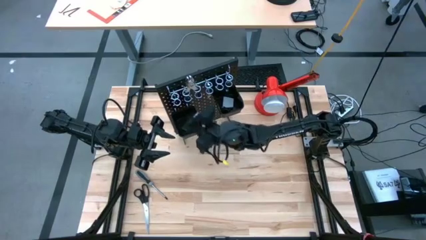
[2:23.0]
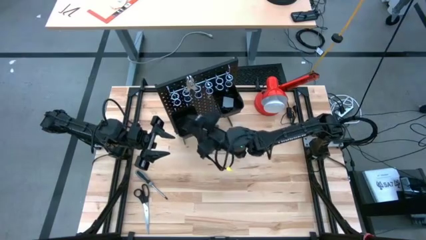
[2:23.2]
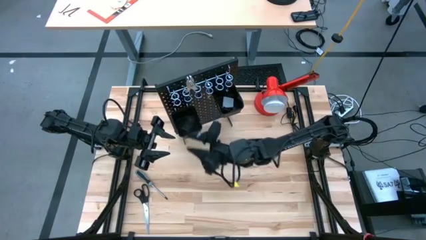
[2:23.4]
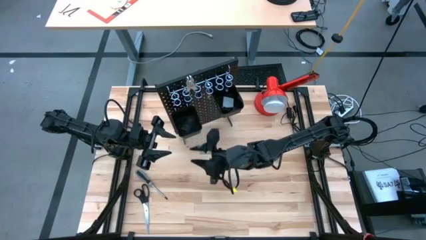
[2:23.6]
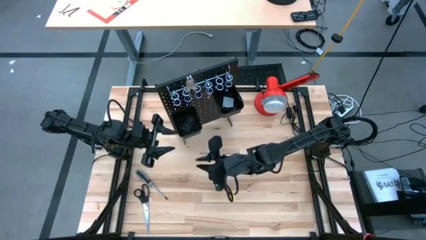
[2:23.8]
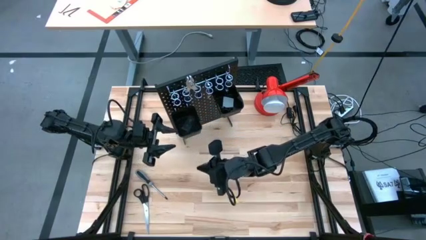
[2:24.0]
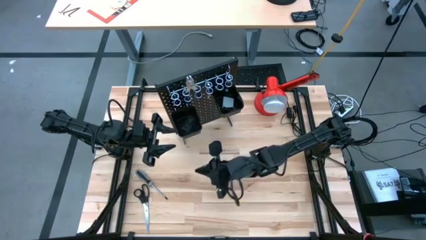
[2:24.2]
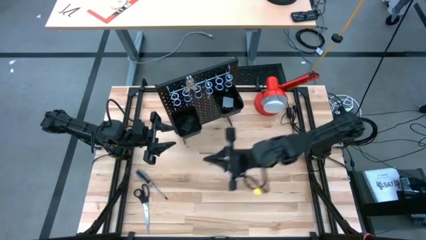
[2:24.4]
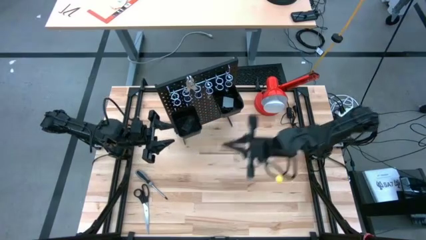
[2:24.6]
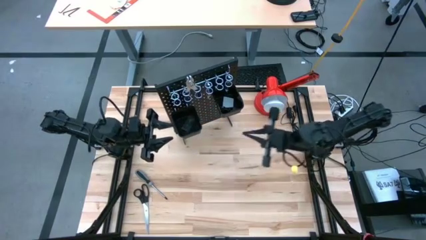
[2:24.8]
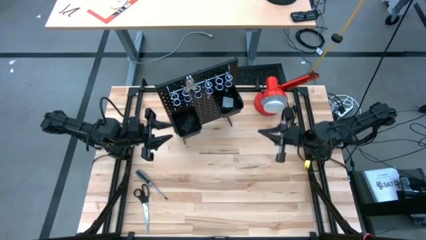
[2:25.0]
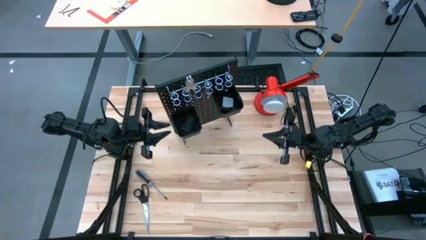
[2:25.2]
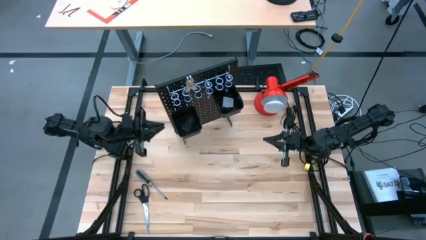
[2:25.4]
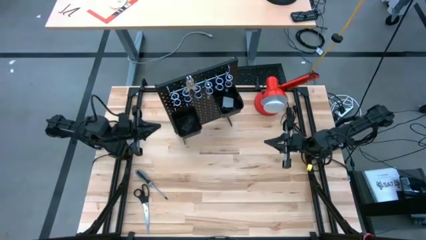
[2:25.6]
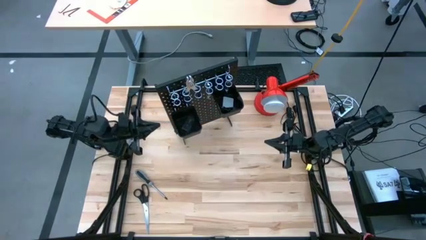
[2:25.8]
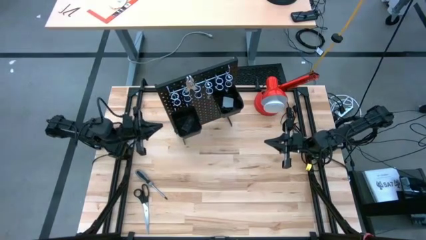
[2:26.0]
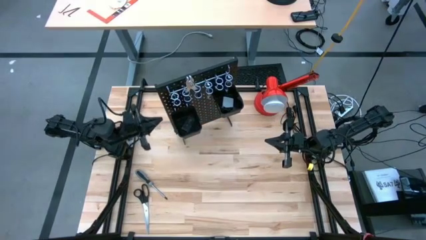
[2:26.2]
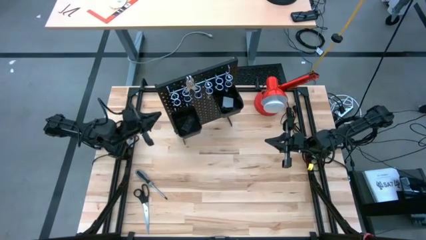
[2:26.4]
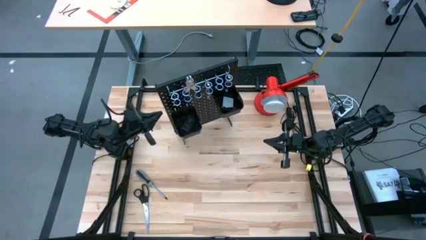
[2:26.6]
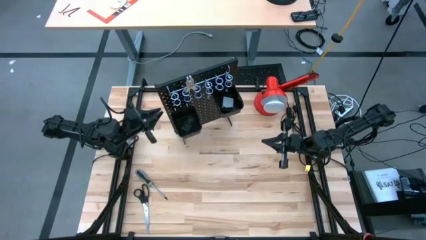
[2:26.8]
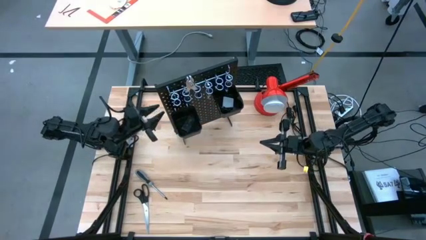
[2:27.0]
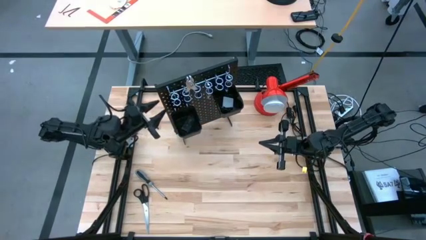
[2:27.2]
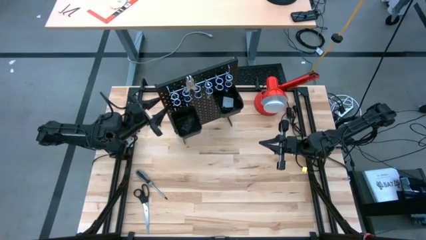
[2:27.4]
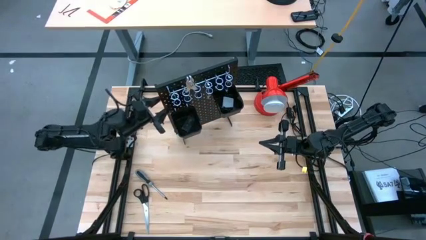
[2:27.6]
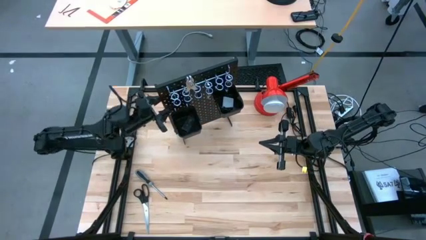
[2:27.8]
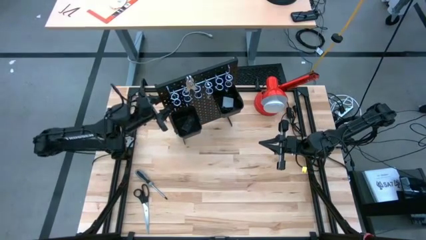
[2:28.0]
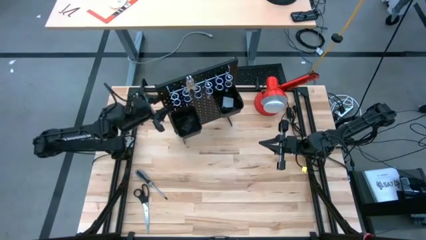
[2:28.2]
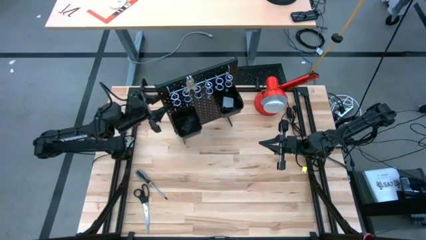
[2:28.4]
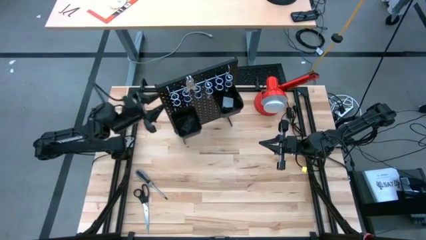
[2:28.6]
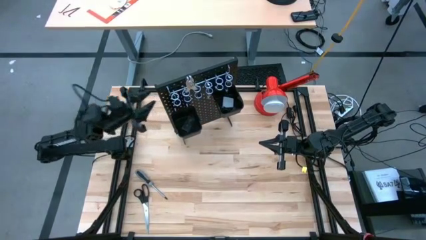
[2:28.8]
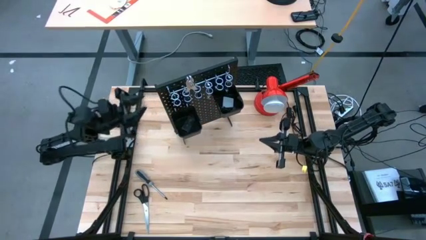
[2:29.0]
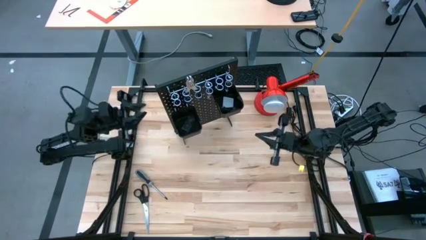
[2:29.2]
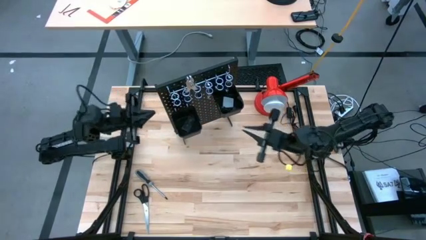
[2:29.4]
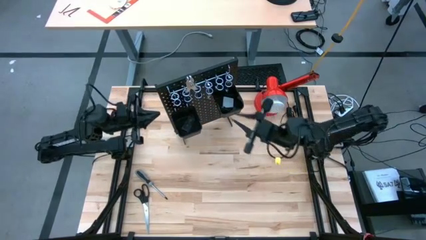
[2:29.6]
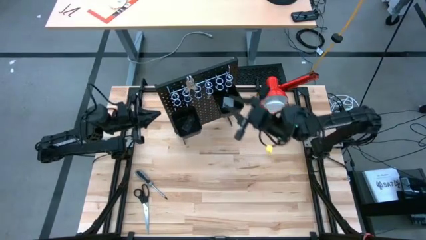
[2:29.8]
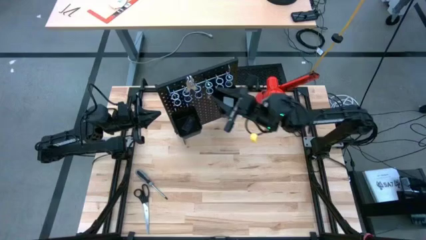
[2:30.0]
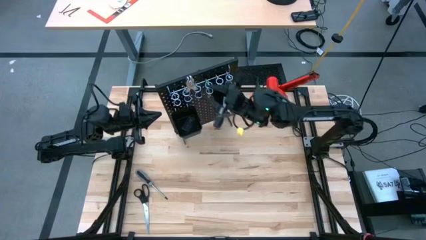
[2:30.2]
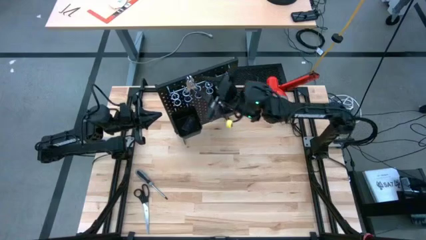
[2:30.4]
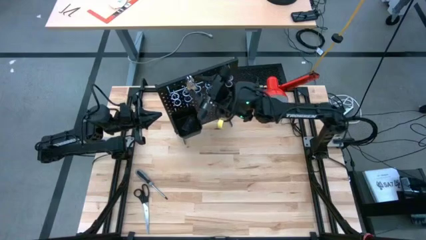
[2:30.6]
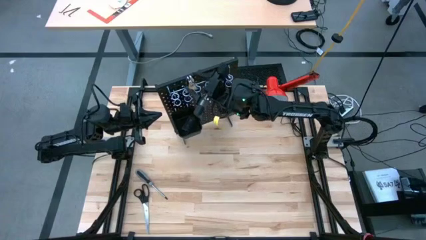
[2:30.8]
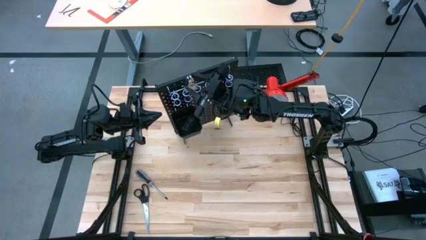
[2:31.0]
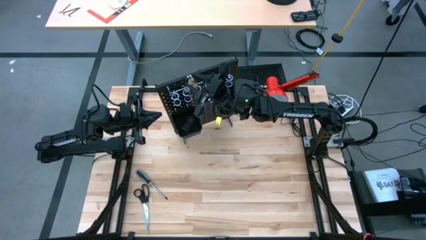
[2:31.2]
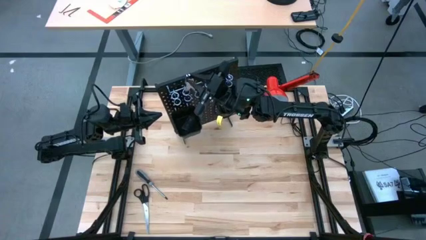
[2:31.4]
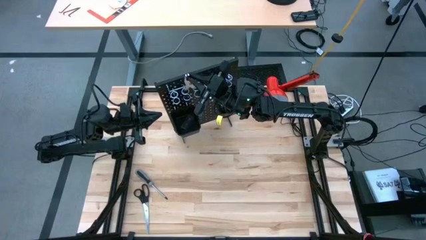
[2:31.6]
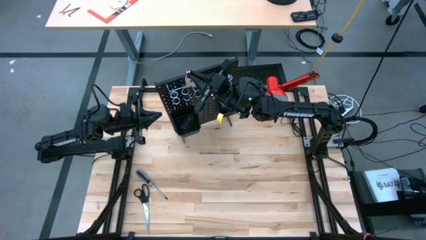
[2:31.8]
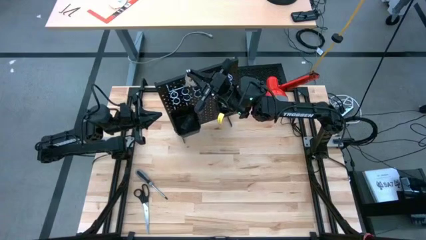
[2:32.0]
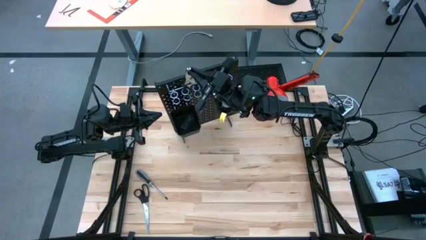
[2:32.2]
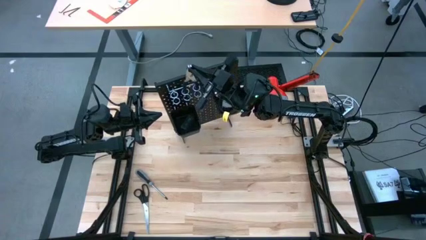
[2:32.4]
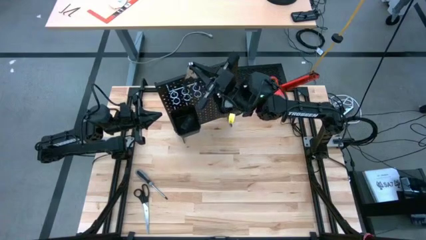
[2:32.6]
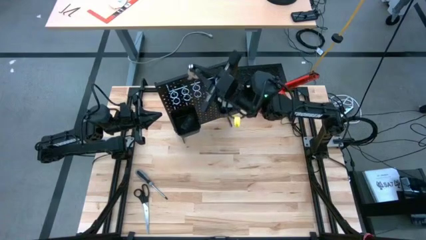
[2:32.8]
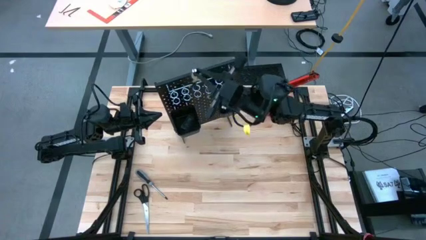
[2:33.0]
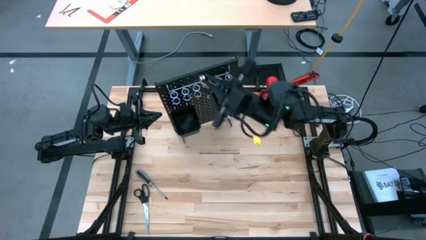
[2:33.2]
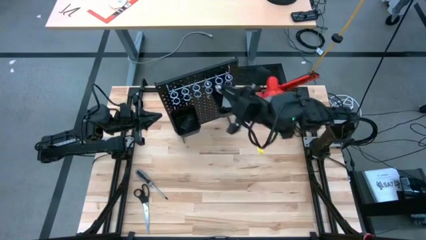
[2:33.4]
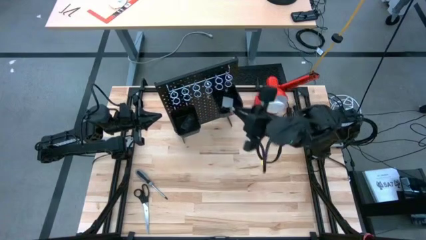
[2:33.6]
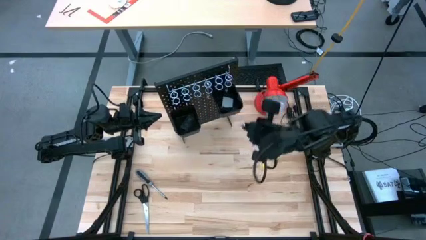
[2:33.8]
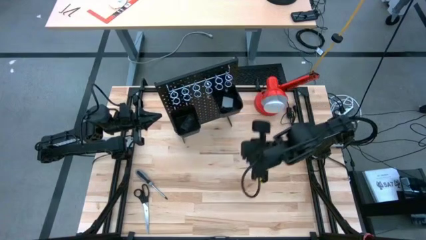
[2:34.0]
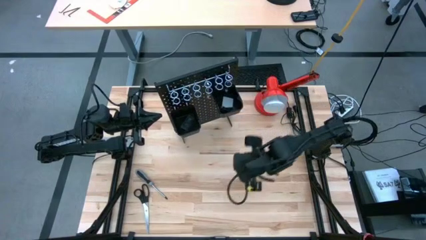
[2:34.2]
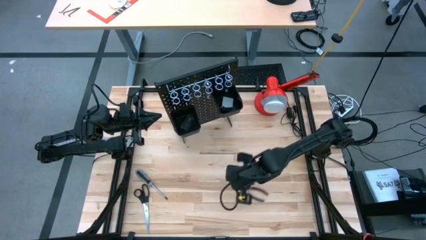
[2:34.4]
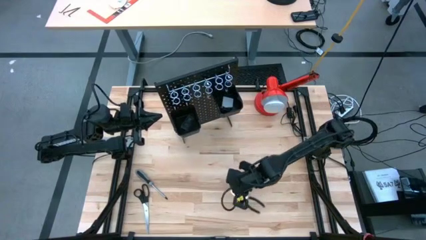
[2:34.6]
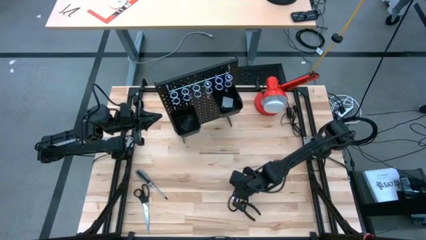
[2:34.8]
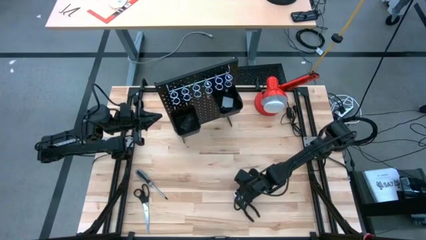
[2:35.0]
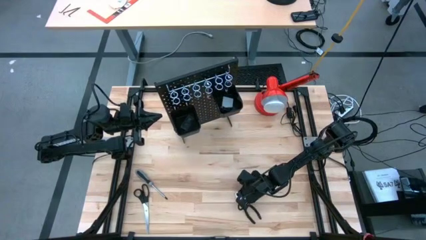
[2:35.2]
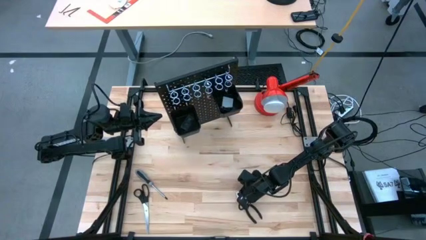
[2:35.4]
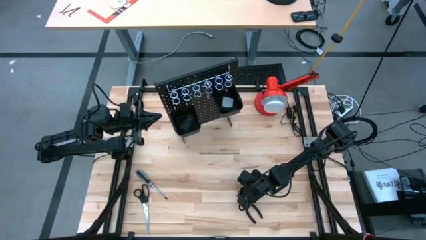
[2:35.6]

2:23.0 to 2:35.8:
Task: Hang tools onto peg board
Unhang the pliers from the pegboard to the table

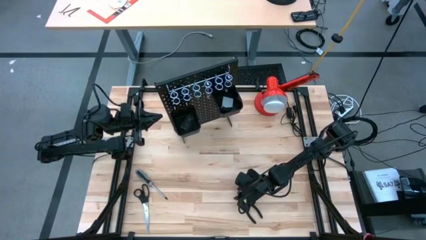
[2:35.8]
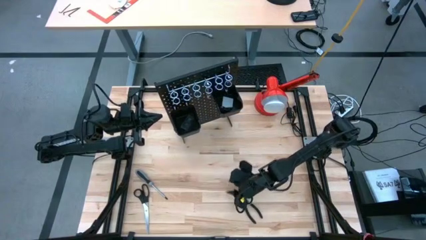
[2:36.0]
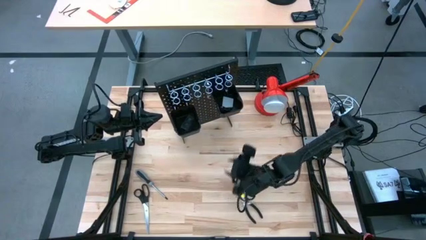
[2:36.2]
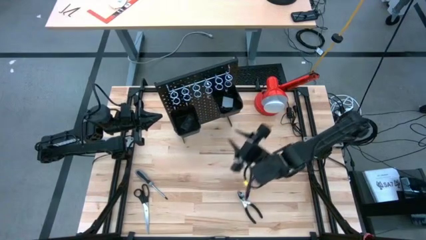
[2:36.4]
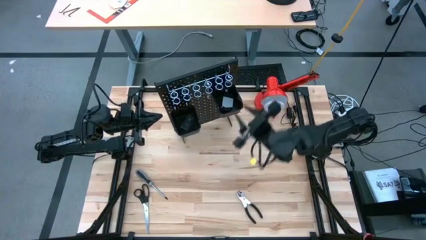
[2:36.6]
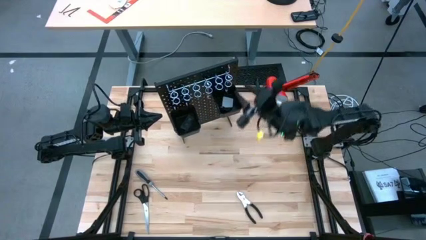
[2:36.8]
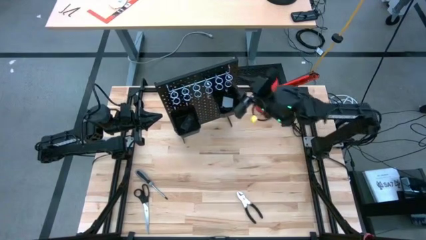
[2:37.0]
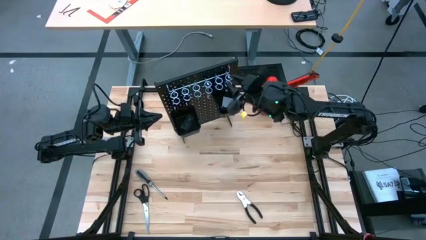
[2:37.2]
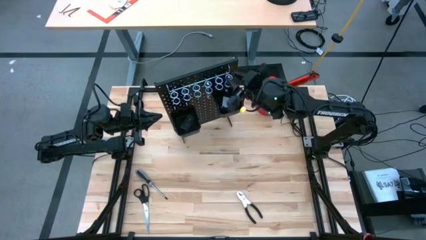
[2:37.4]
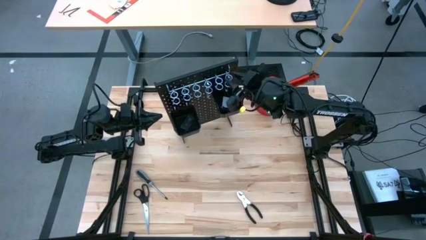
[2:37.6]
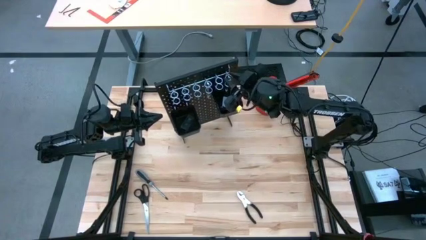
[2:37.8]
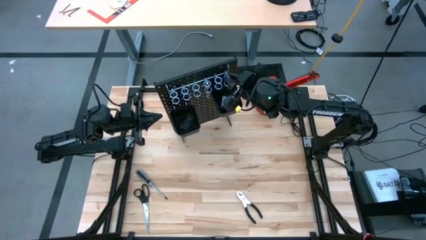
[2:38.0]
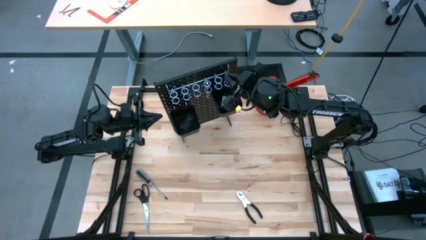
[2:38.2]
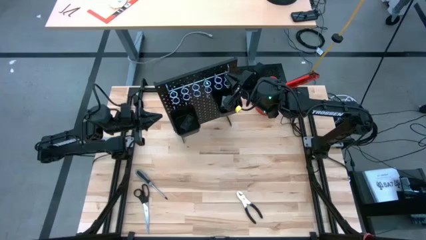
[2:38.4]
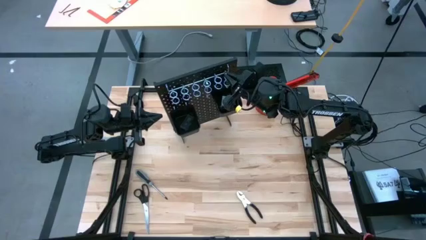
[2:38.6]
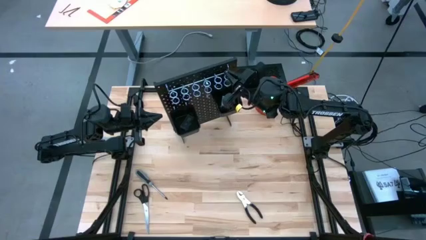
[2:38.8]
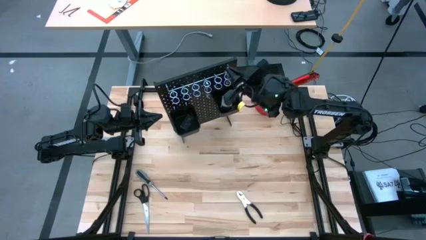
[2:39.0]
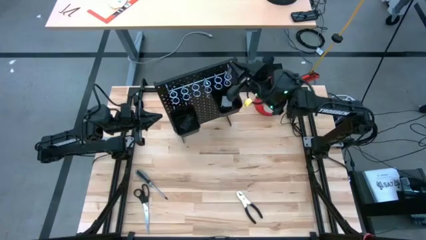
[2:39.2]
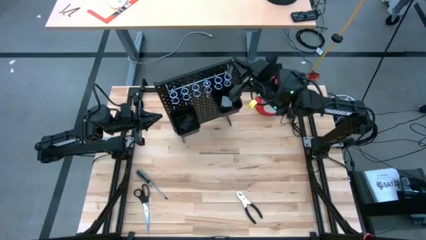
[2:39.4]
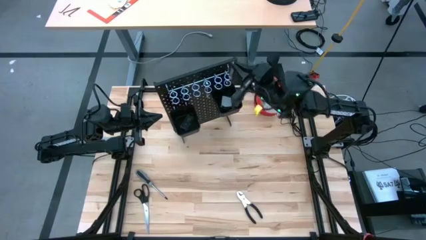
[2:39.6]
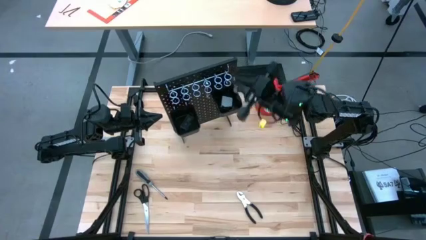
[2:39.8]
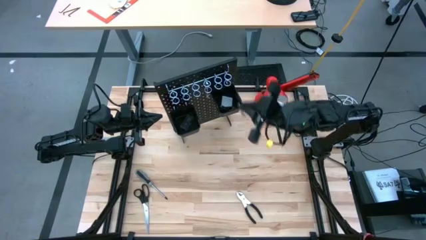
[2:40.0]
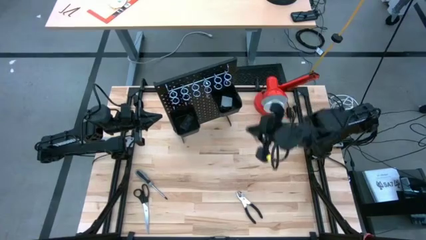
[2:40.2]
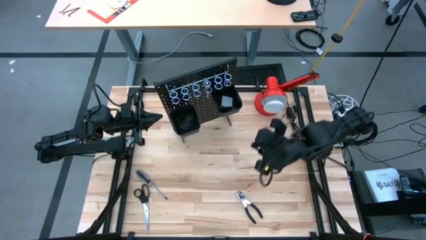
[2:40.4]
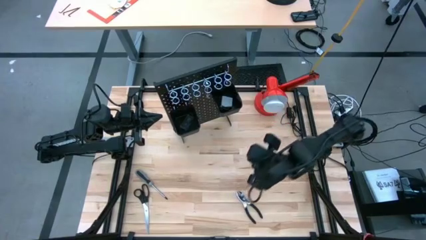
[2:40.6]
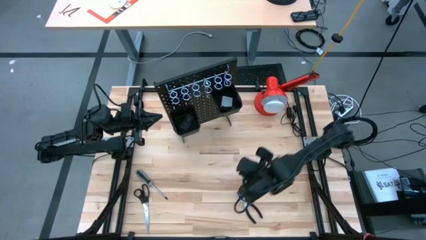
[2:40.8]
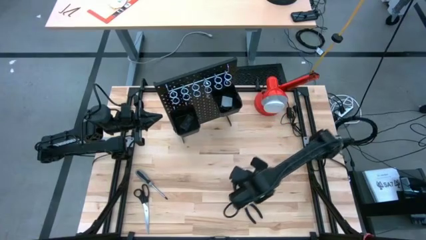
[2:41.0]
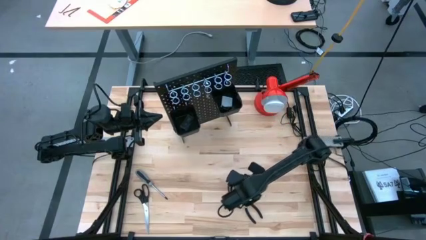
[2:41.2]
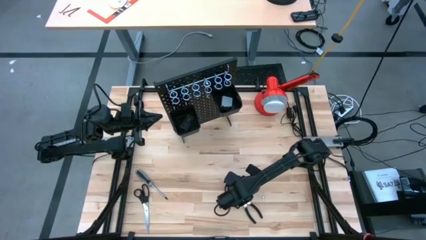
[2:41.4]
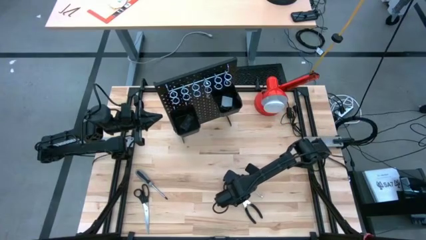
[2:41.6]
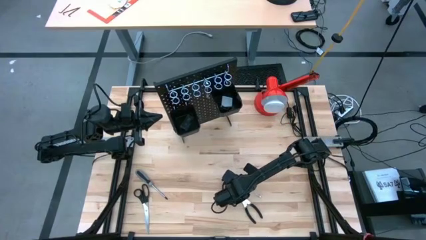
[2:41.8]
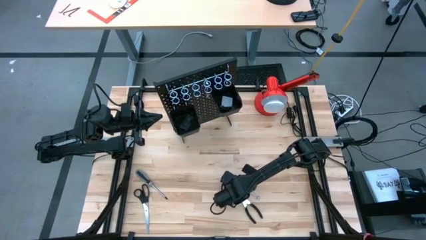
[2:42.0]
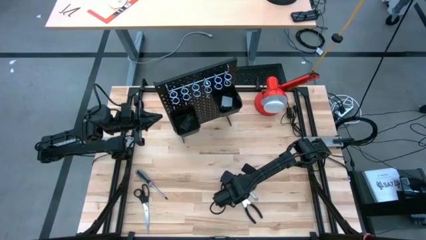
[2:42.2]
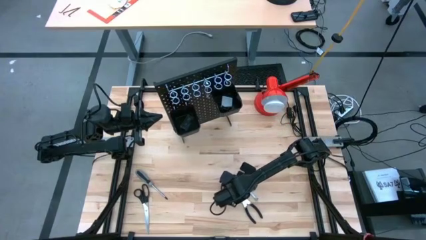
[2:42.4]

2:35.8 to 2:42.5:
Unhang the right wrench from the pegboard to the table
